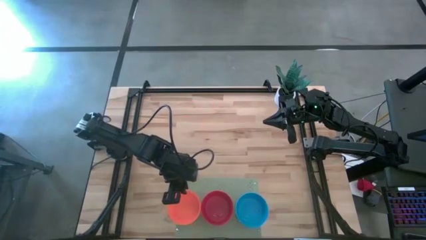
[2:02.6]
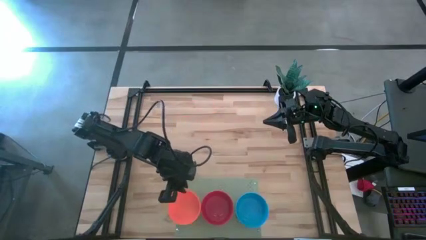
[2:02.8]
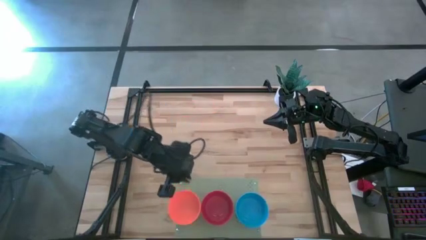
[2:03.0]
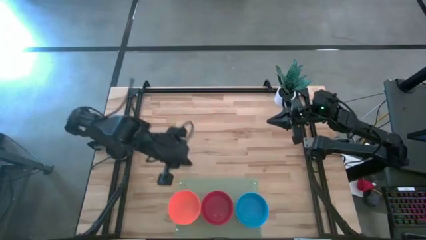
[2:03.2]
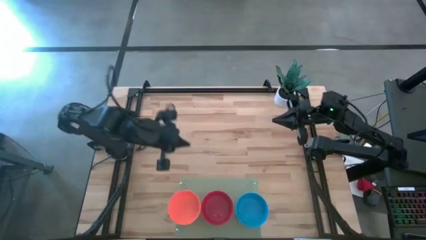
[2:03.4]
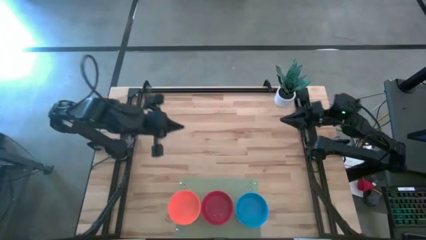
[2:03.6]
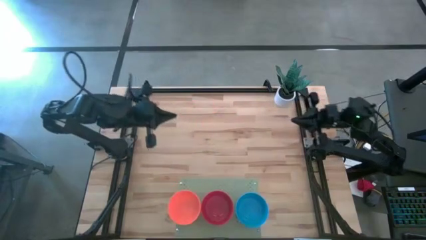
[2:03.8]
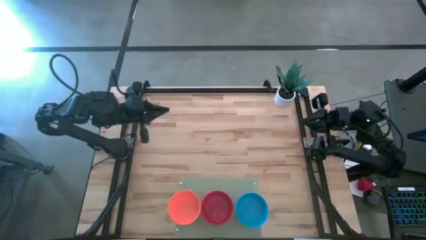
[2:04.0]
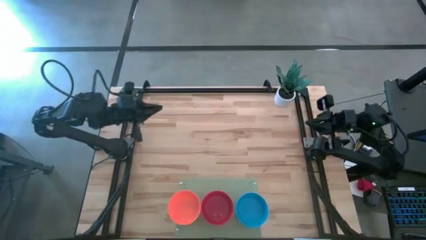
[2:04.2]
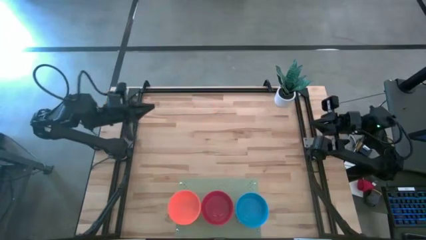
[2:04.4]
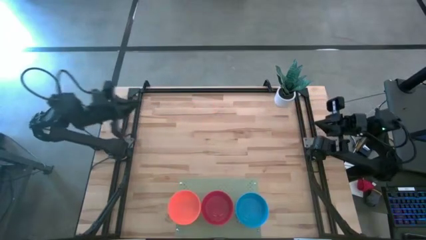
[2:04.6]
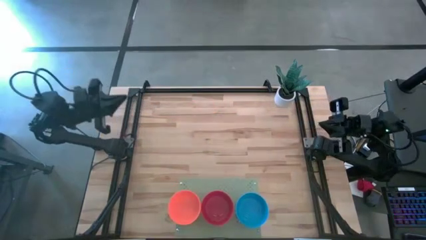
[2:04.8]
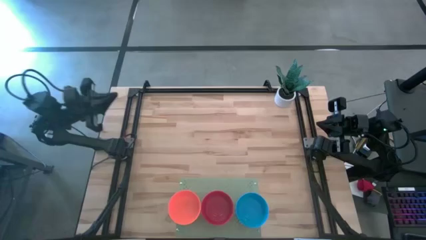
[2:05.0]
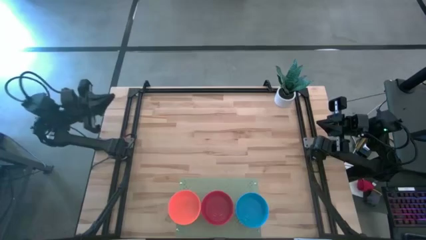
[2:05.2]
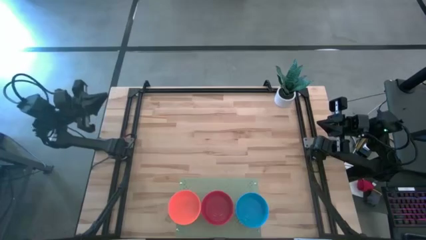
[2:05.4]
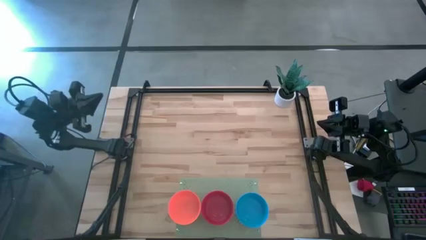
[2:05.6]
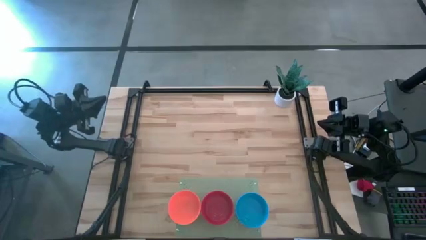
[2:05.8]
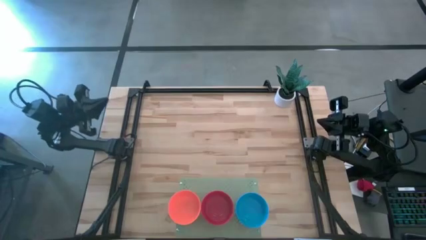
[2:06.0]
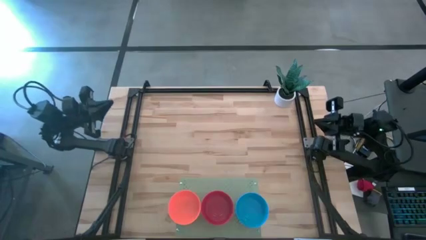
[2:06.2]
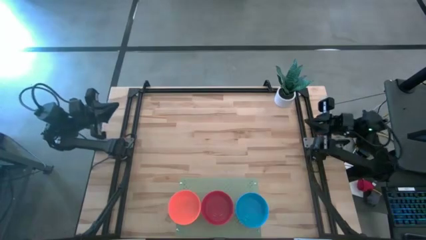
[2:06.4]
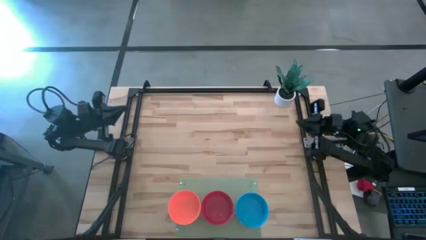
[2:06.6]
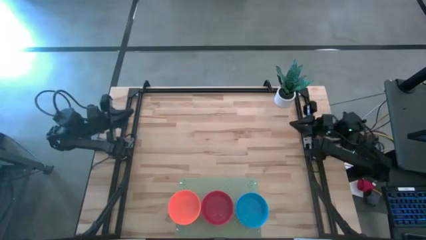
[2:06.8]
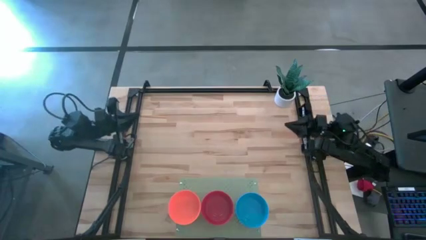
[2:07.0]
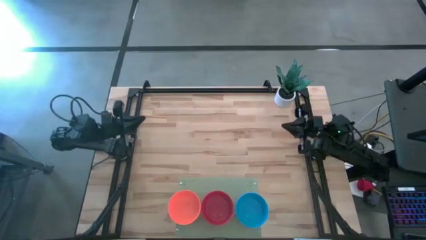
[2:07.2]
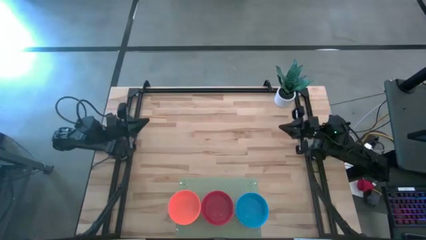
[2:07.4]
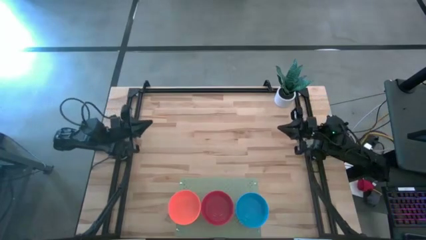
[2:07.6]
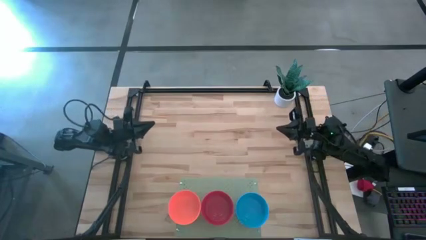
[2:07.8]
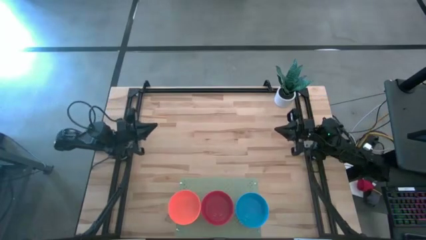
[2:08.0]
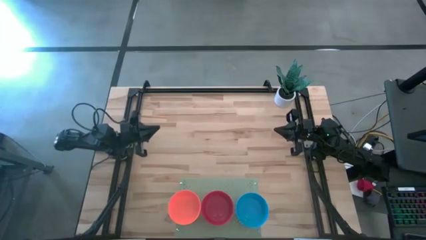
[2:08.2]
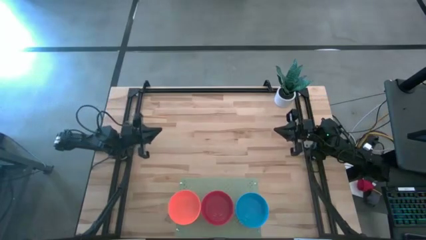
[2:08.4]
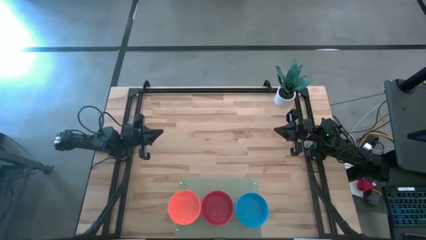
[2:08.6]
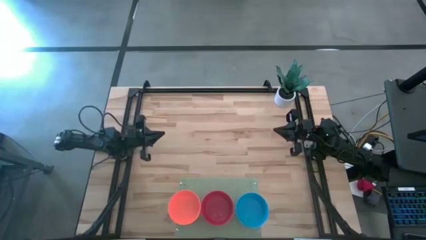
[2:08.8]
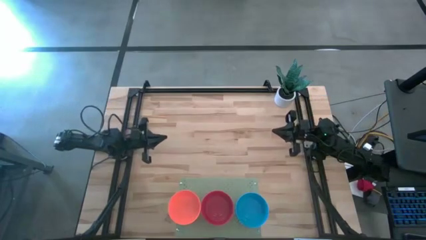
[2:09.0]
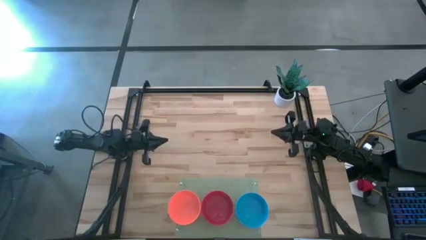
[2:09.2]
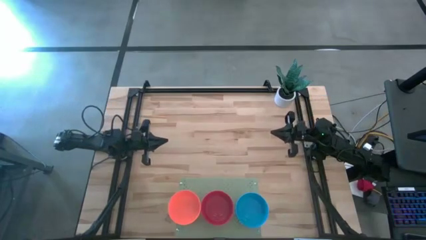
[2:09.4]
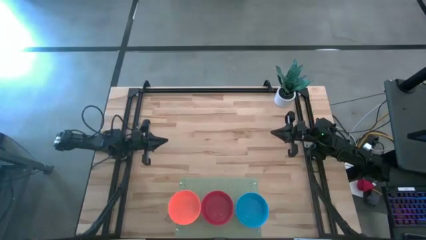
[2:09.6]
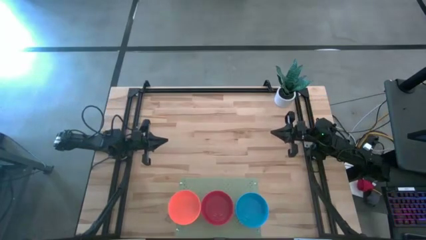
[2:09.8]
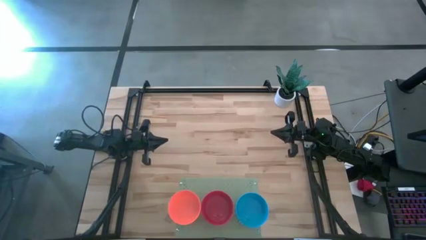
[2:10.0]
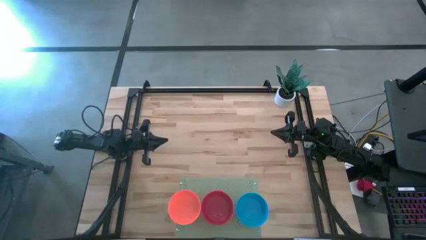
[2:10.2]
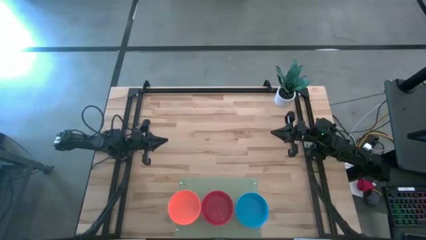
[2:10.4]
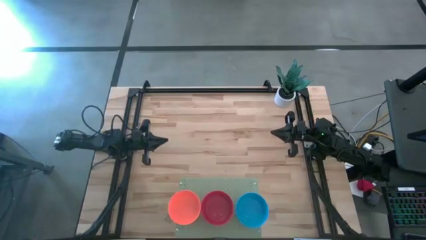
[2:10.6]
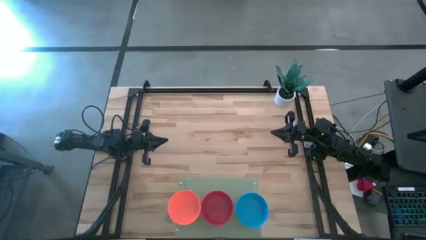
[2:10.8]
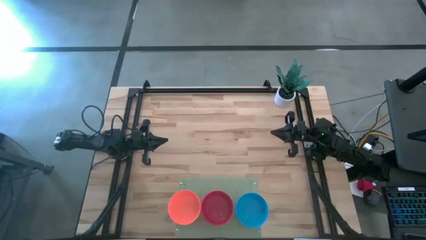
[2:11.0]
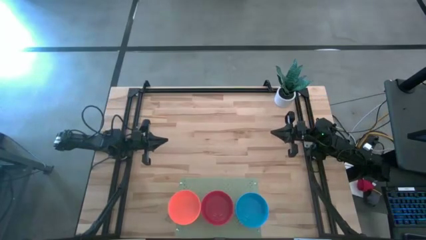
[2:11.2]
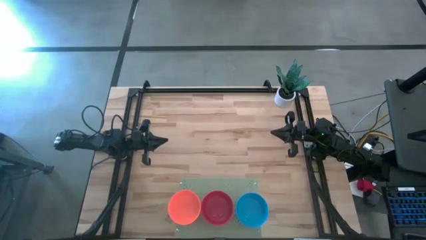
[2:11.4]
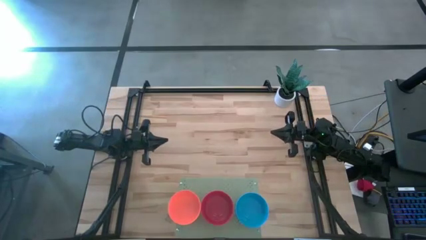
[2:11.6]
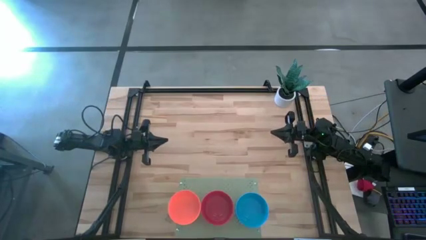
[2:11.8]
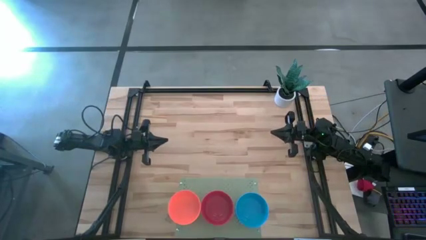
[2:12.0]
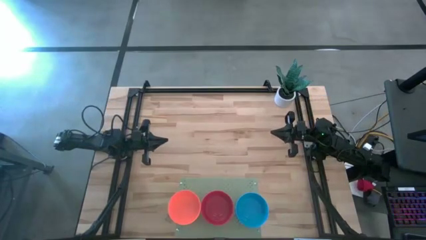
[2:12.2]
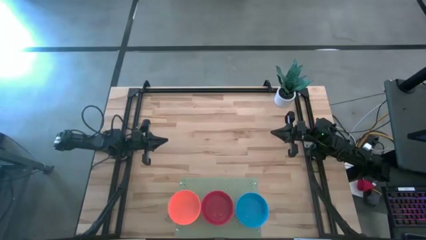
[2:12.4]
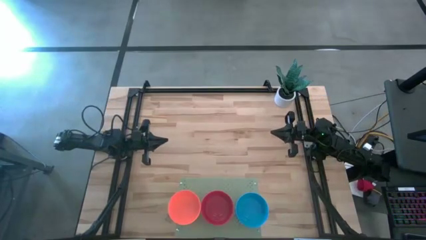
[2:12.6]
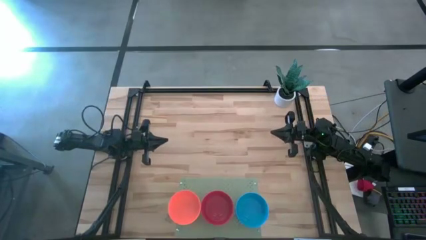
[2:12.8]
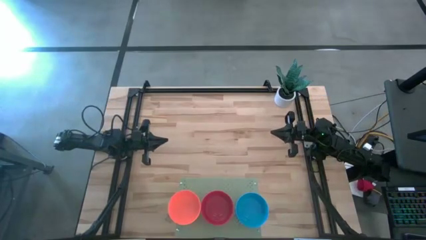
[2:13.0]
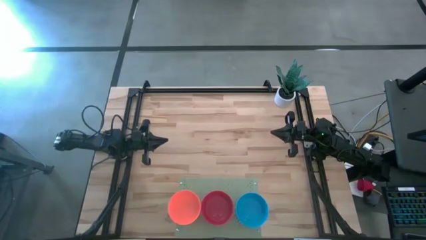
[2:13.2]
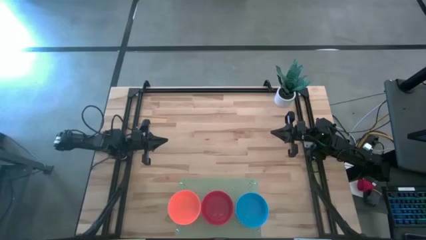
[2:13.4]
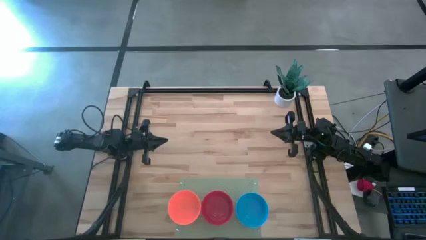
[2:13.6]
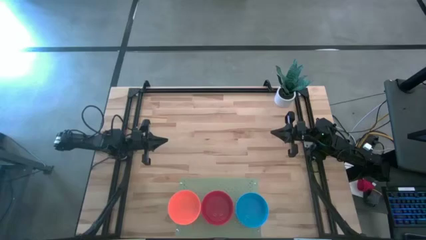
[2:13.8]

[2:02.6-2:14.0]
Task: Pick & Place Mini bowls
Return to Home Position

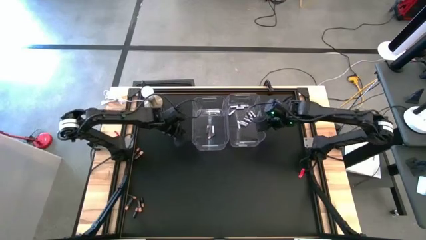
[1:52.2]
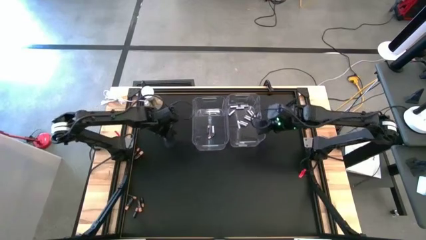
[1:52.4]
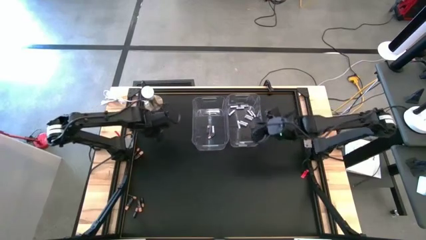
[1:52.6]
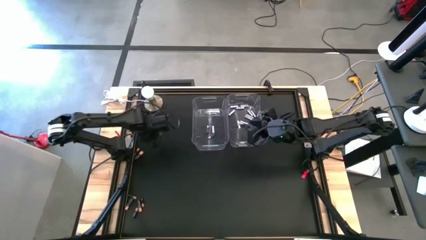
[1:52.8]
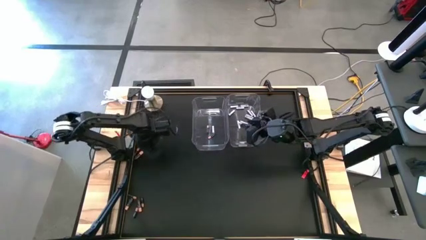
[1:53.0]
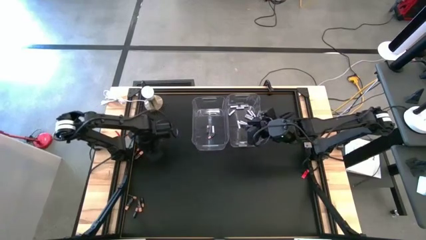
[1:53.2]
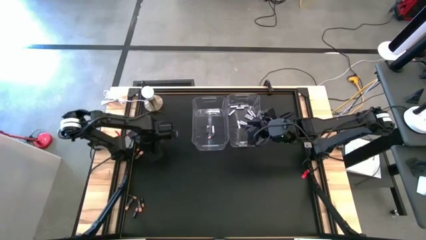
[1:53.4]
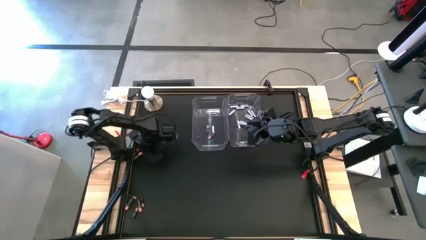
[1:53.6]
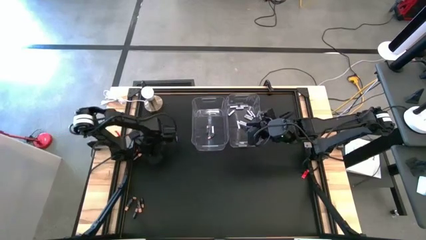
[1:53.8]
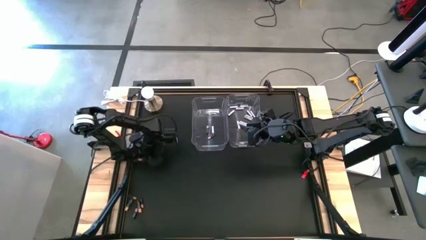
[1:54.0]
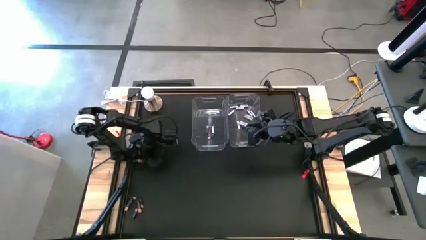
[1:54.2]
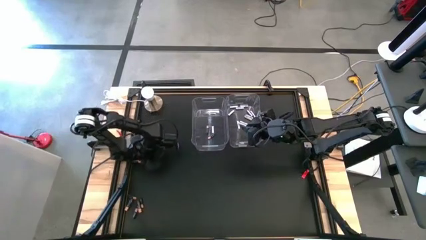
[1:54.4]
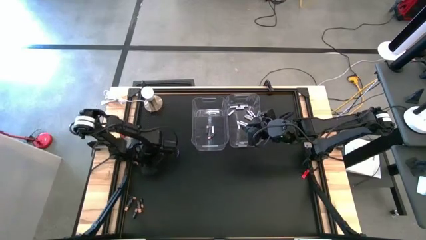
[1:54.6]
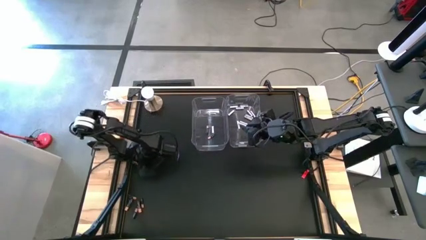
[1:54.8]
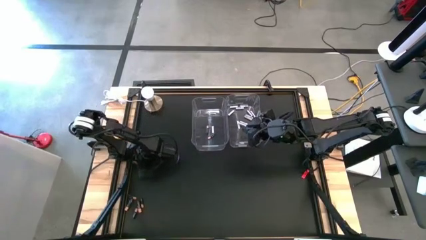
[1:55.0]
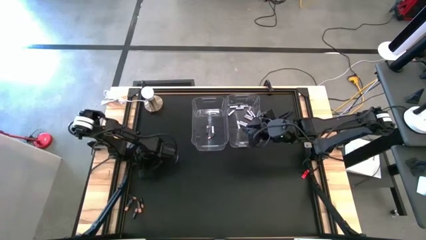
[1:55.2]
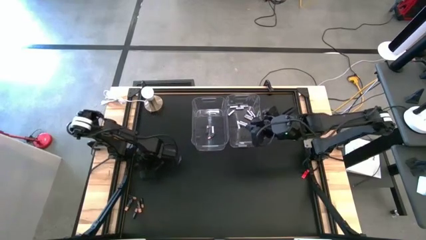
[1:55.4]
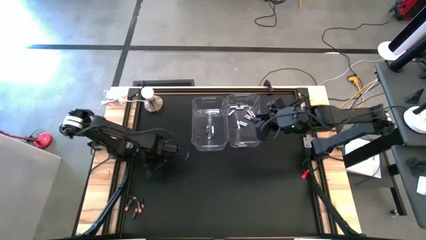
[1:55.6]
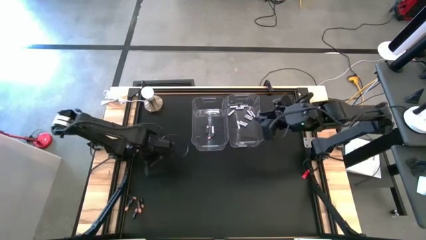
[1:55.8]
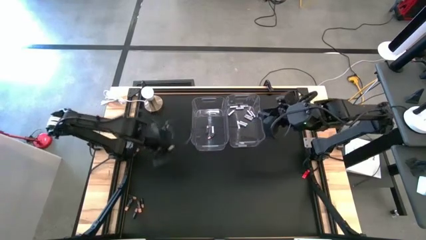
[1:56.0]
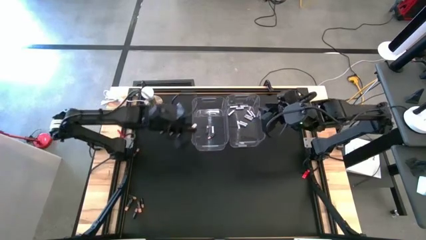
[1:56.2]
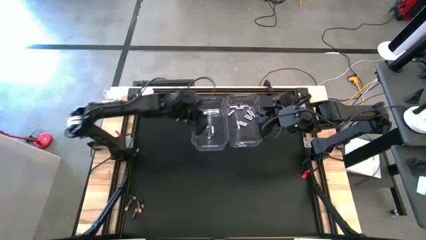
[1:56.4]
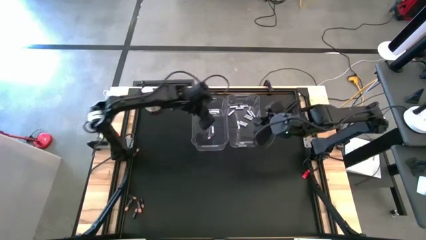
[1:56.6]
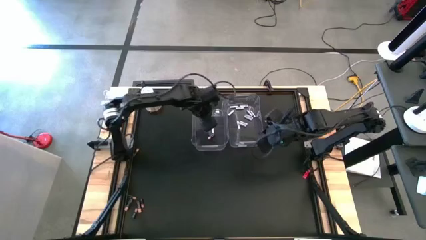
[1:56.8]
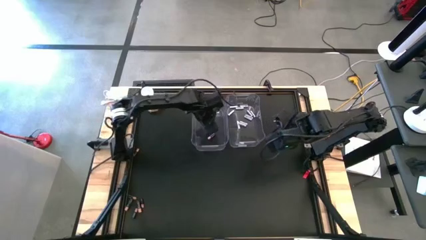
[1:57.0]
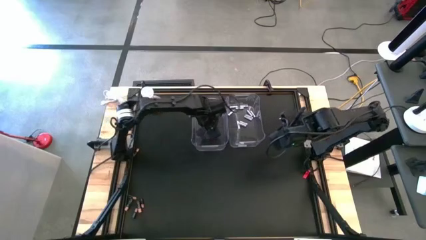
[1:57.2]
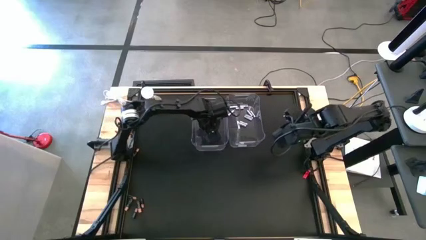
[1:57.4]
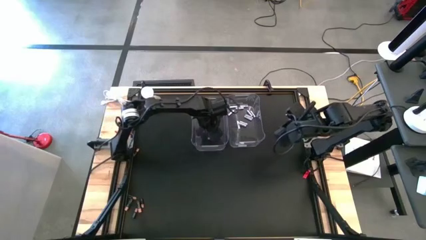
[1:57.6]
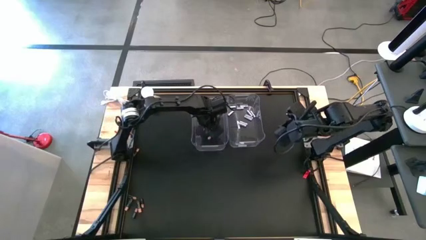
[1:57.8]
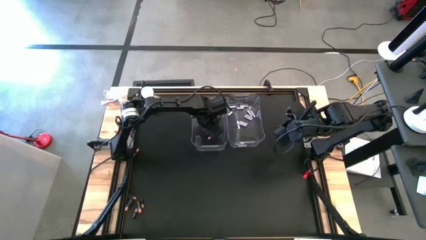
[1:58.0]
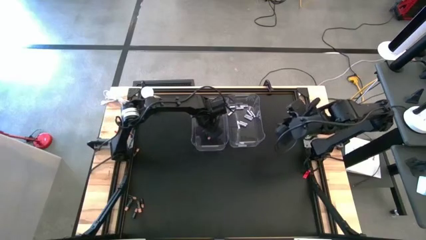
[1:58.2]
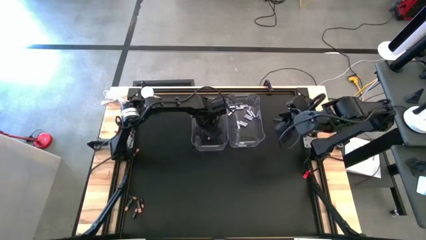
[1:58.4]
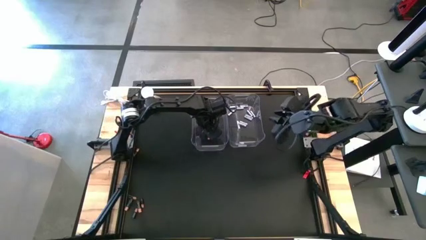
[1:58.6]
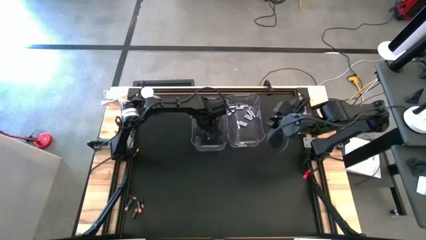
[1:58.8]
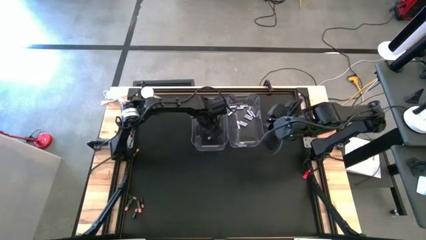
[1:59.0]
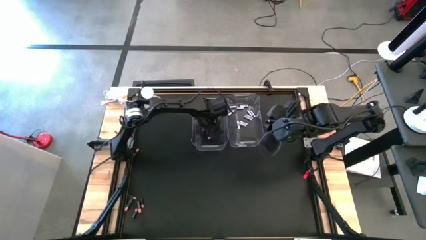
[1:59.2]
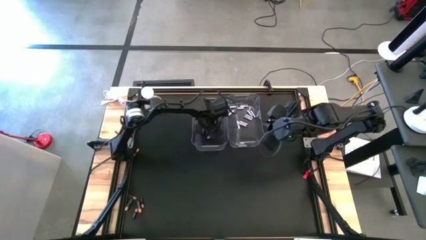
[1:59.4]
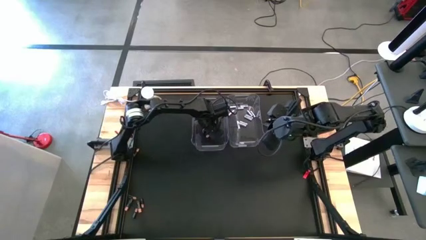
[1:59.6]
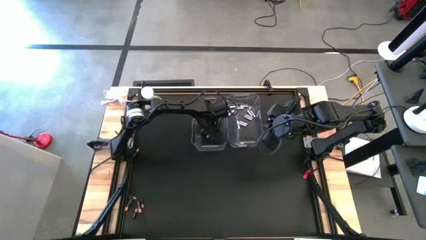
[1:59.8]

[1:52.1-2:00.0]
Task: Sort batteries
Put the black battery into the left transparent bin
